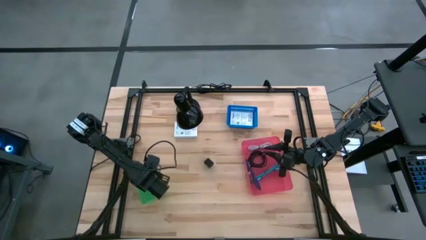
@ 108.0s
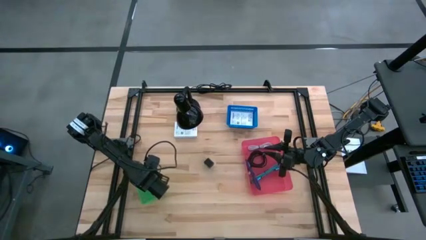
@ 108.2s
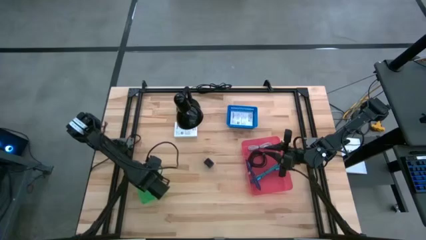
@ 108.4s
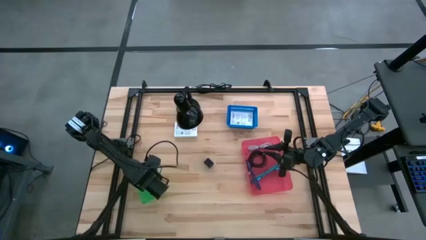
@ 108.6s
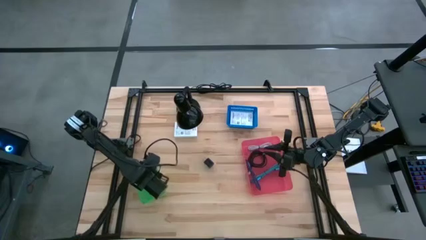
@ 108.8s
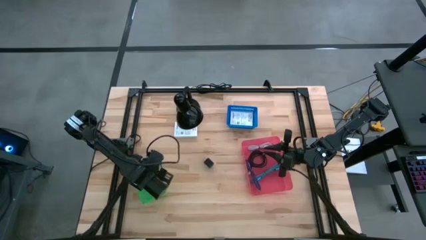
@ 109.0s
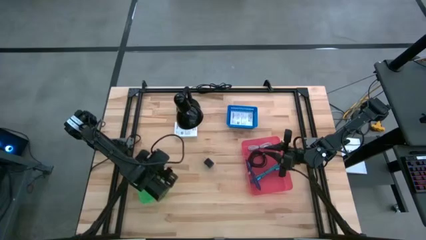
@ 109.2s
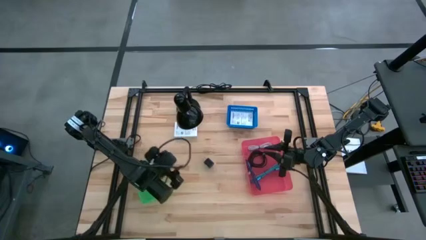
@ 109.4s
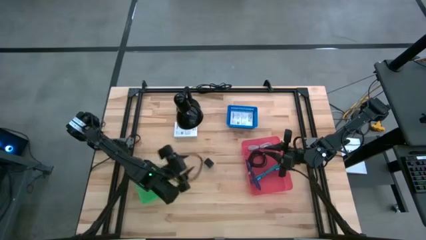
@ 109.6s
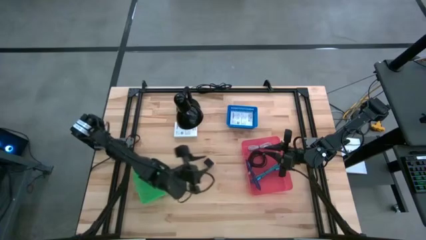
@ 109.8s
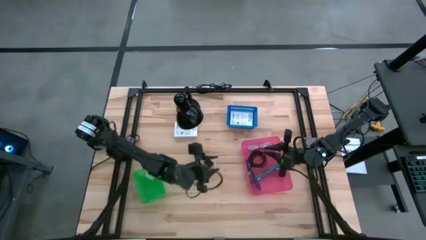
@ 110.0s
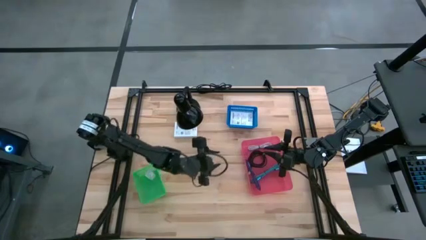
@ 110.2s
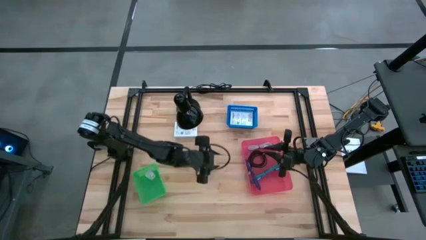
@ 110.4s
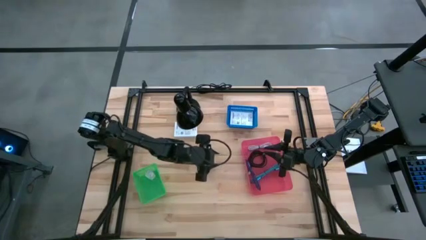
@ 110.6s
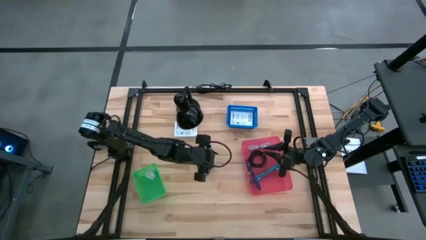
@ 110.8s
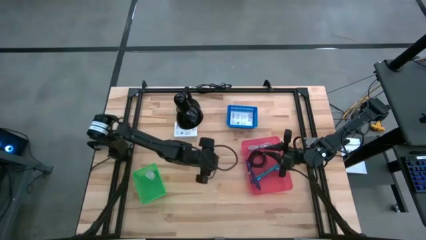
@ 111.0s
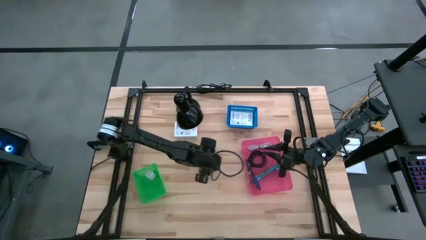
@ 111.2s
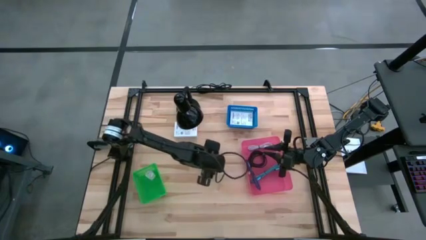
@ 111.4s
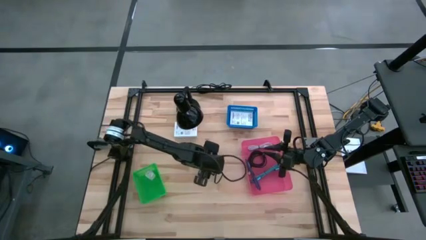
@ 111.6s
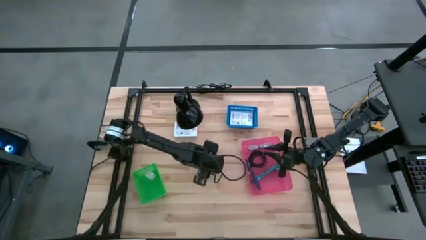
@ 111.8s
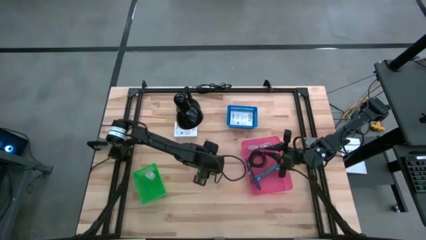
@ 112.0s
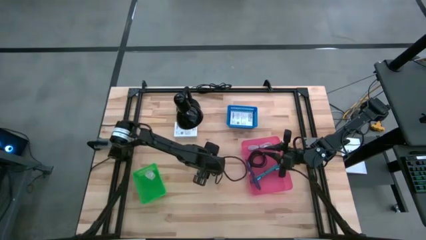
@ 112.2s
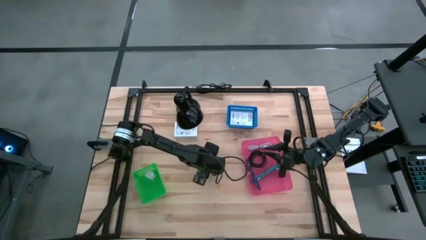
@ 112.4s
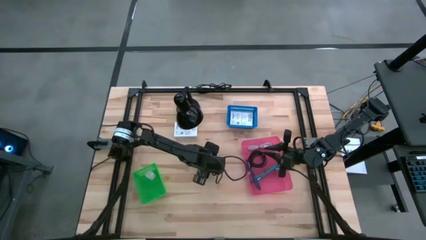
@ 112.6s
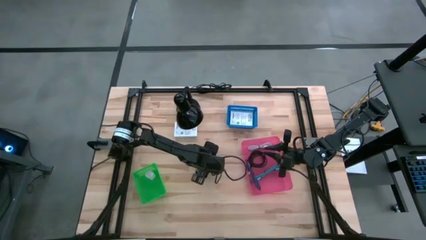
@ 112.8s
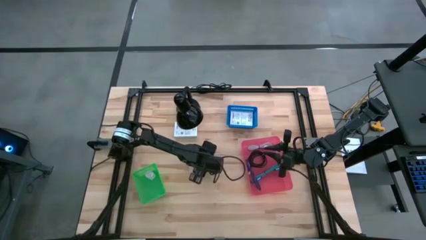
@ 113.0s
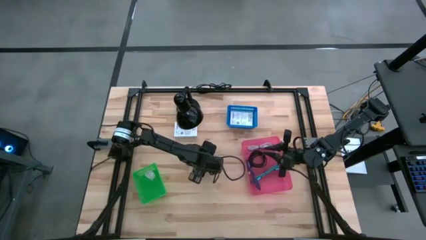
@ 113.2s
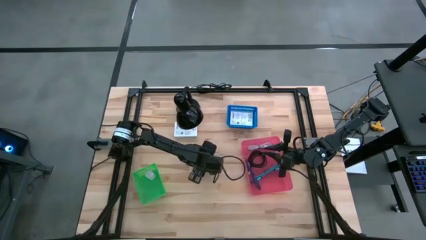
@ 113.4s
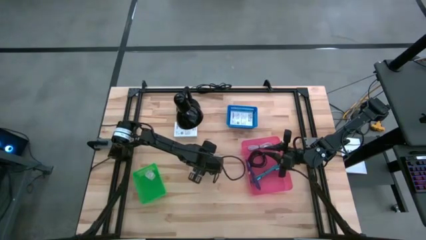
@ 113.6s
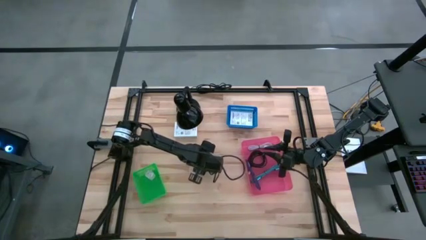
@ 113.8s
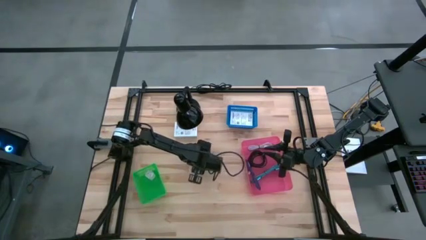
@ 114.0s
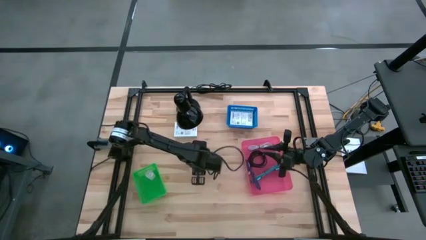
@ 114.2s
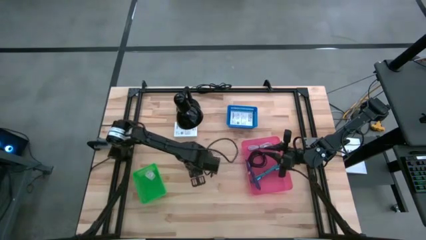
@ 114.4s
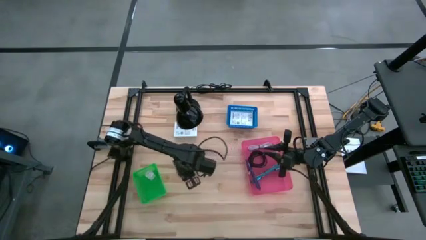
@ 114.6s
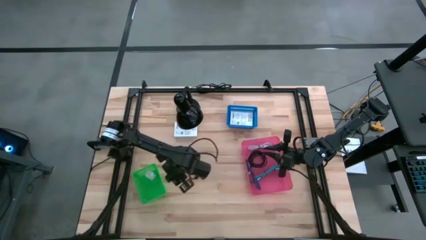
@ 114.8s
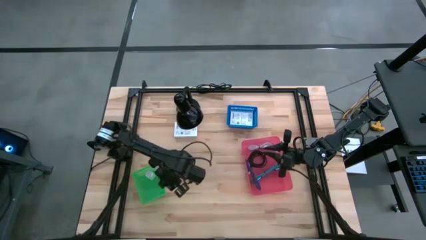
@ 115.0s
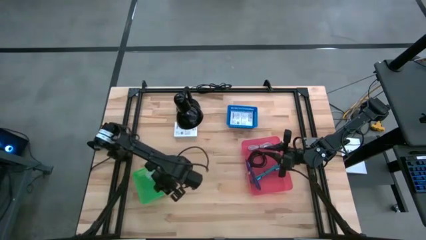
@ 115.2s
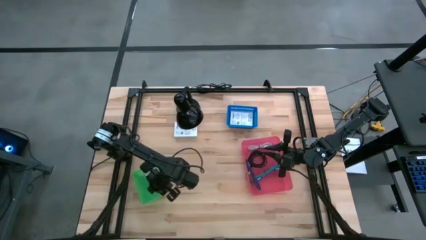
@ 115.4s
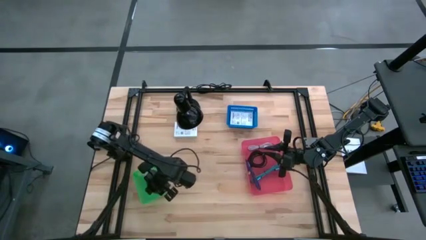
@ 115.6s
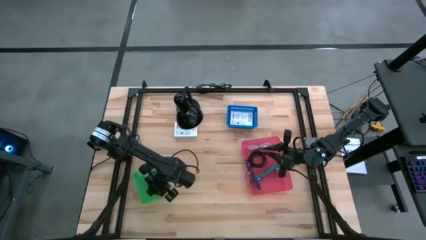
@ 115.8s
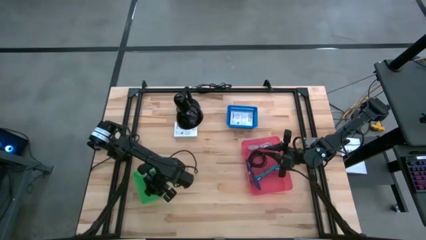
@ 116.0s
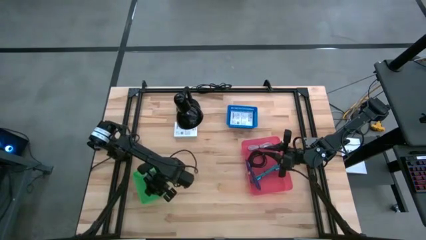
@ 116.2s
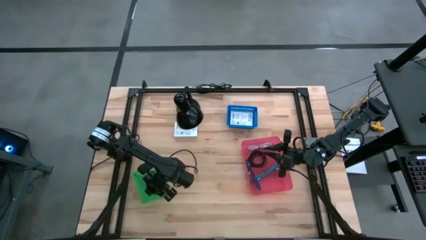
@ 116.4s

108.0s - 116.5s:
Task: Pick and place items into bin
Put the black charger adapter into the green bin

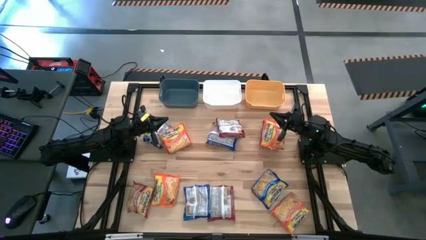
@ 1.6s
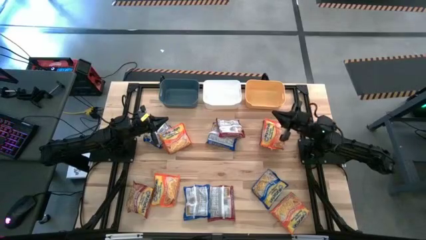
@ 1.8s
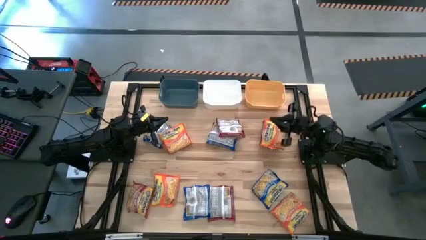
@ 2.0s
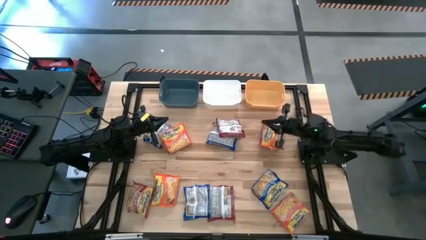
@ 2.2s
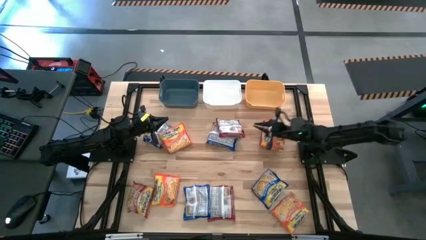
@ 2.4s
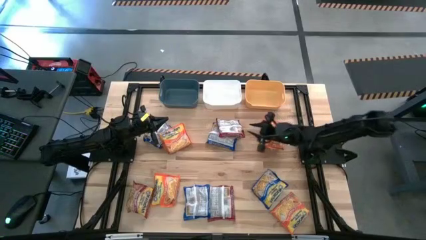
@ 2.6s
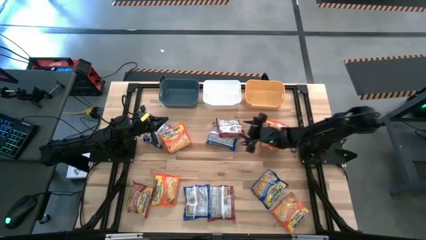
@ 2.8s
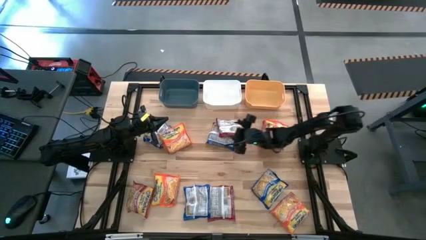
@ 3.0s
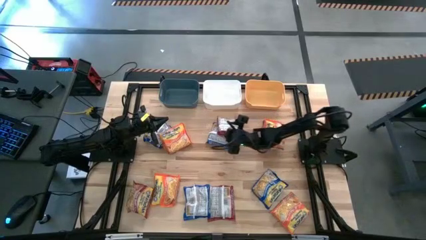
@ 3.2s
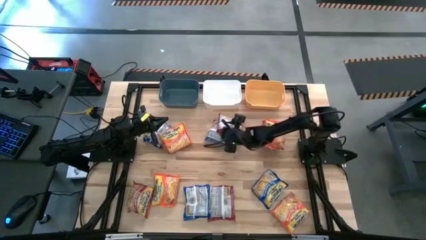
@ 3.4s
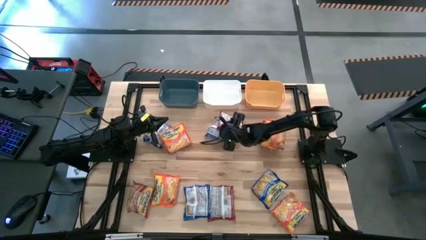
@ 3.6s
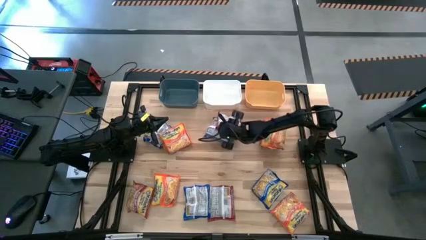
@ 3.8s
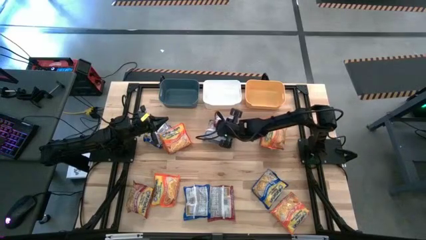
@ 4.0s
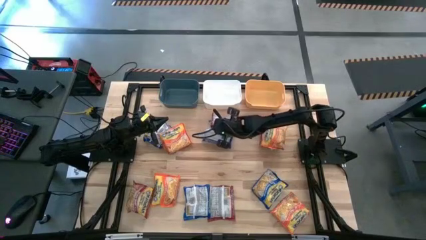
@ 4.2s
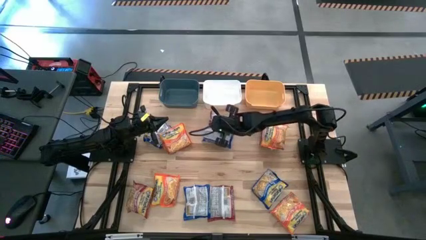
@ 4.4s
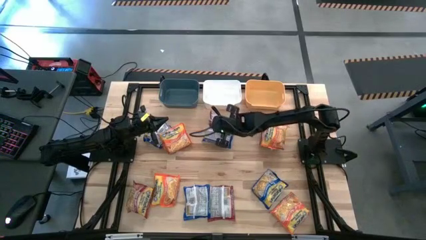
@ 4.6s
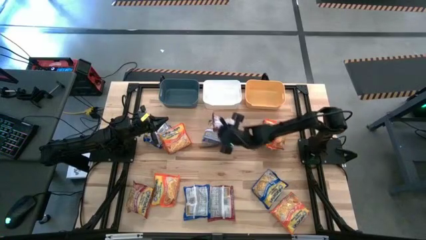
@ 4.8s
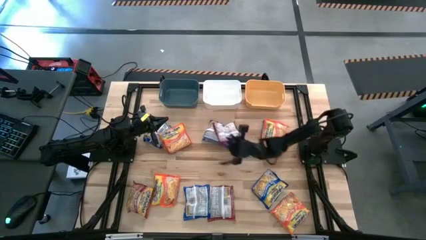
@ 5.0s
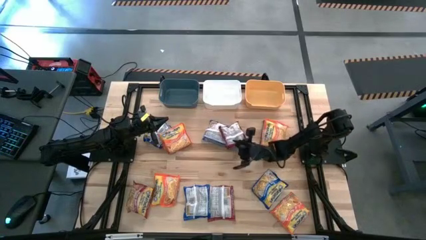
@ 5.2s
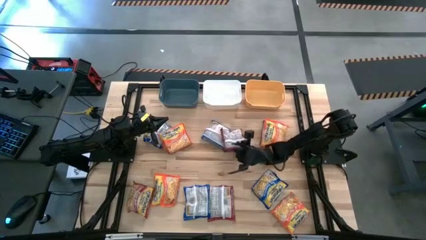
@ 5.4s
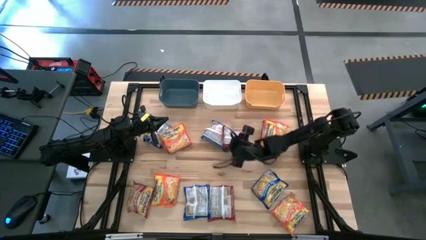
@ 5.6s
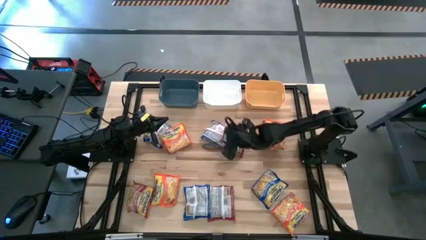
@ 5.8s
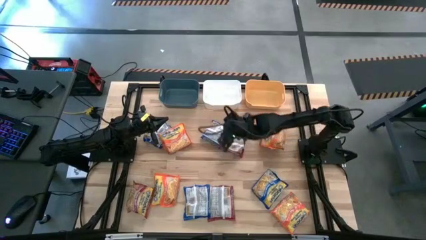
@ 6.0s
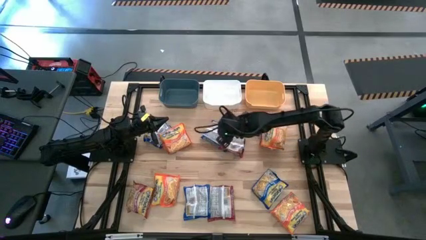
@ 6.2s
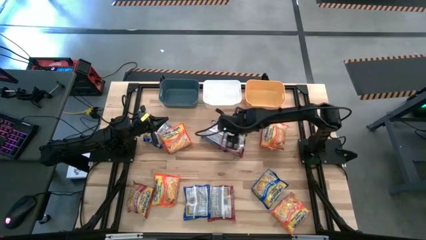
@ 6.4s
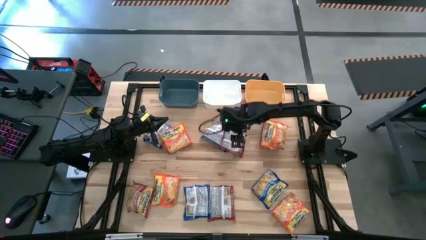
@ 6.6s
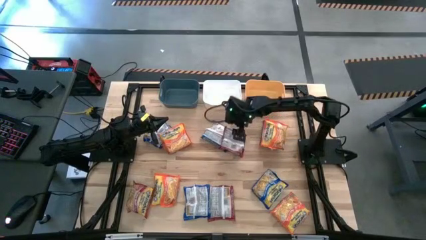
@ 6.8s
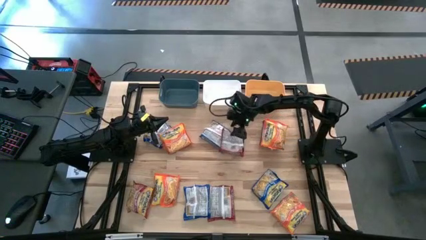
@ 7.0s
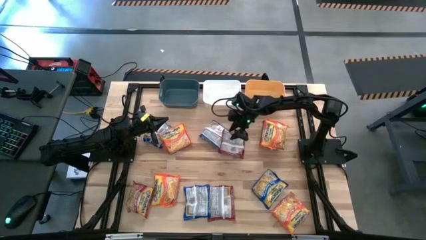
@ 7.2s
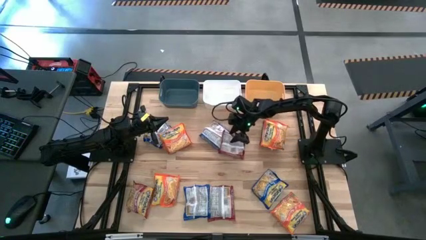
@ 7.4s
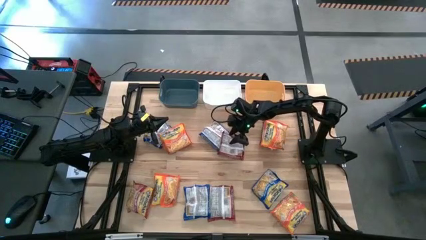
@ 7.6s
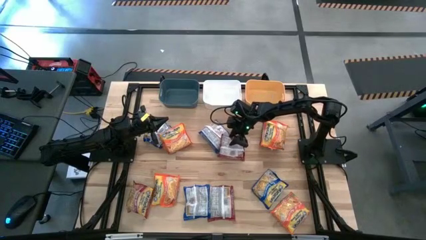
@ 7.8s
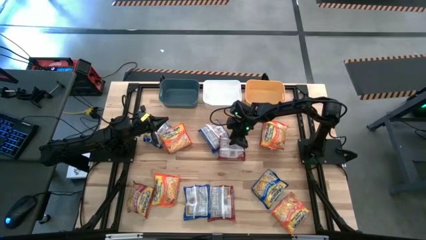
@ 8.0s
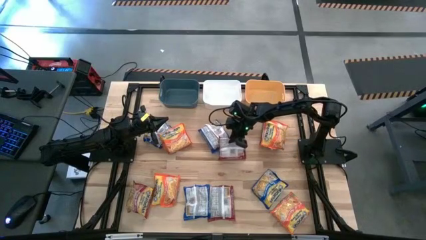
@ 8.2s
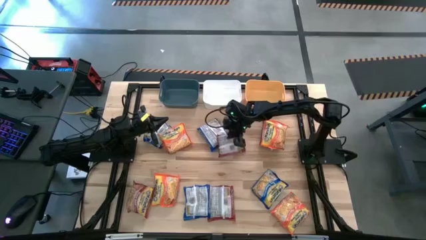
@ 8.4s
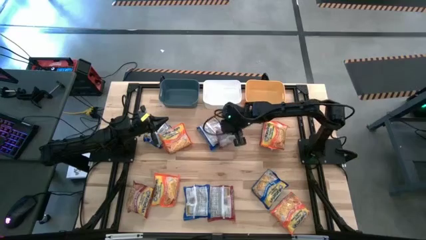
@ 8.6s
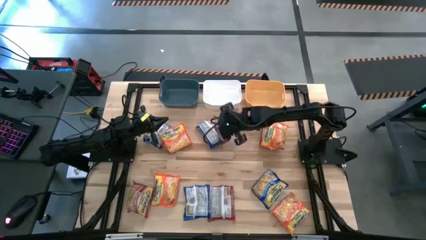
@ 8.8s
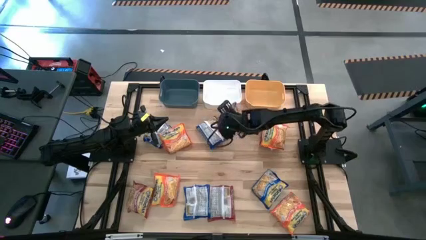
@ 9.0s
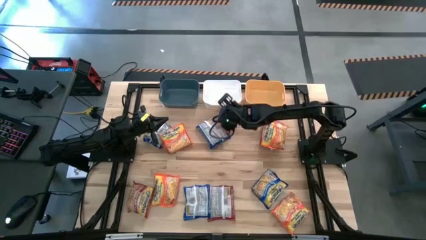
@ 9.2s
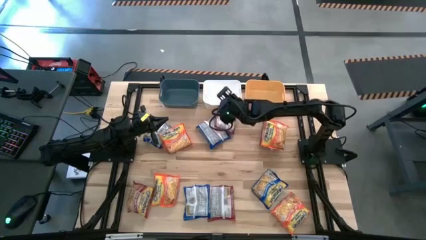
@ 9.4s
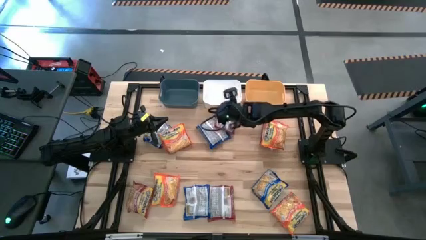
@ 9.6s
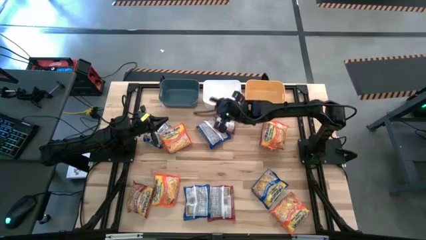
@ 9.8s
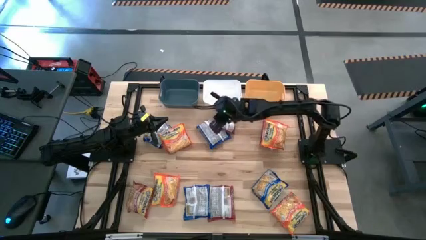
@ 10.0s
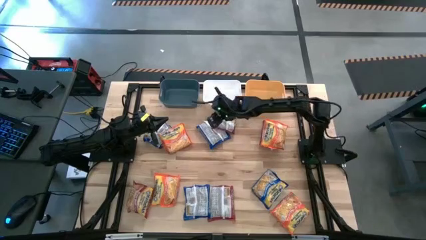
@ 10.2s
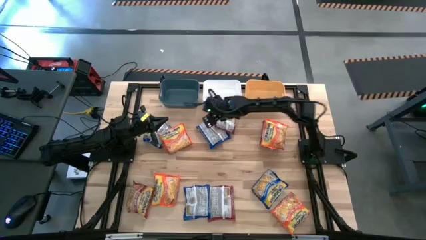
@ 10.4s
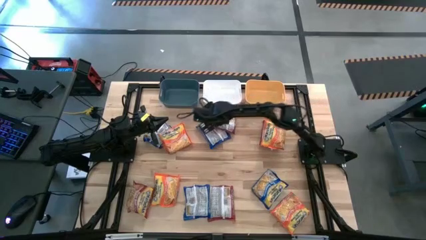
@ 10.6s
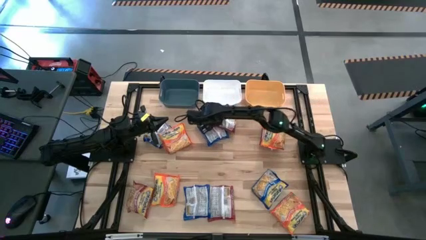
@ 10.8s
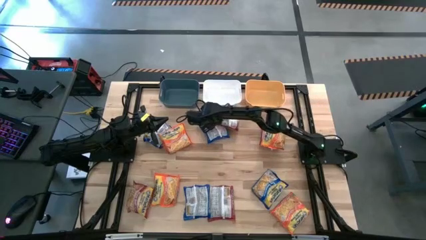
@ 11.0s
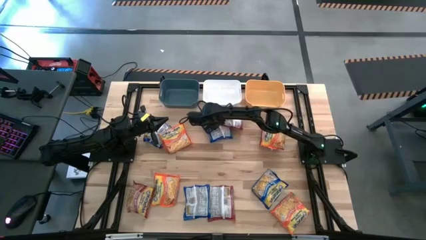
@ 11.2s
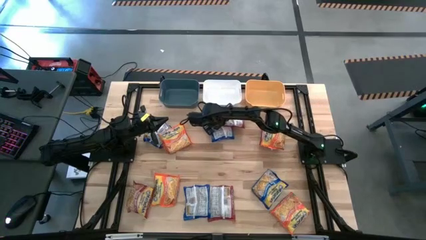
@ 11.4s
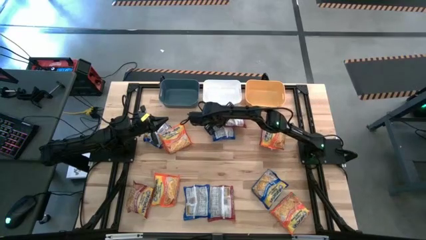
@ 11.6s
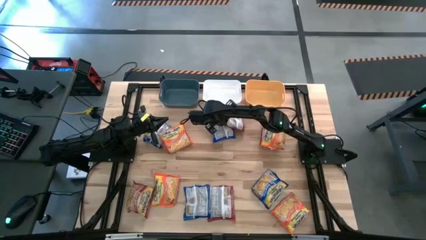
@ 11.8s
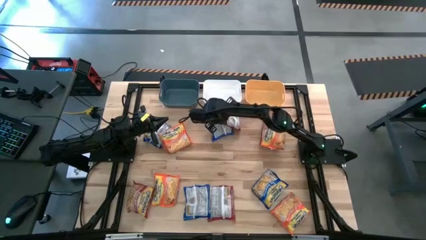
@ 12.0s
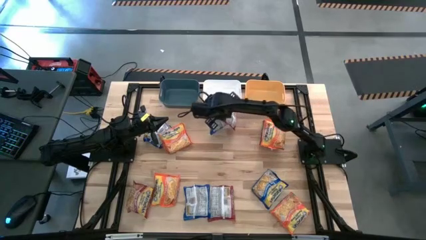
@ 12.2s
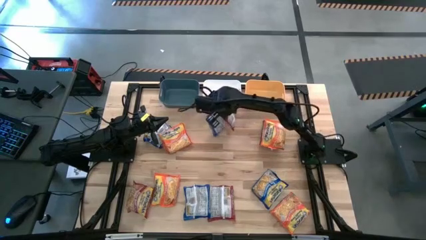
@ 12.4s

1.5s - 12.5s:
Task: Sort Maruchan noodles
Put the top middle red noodle pack into the white bin
